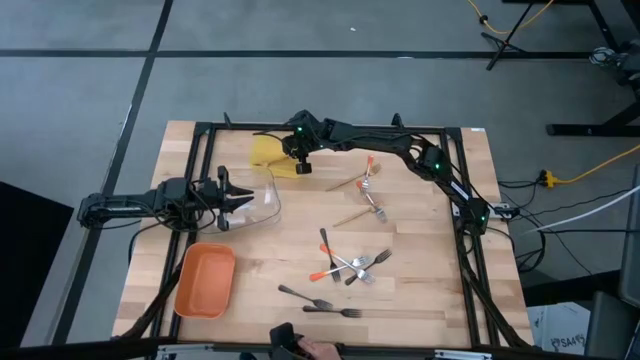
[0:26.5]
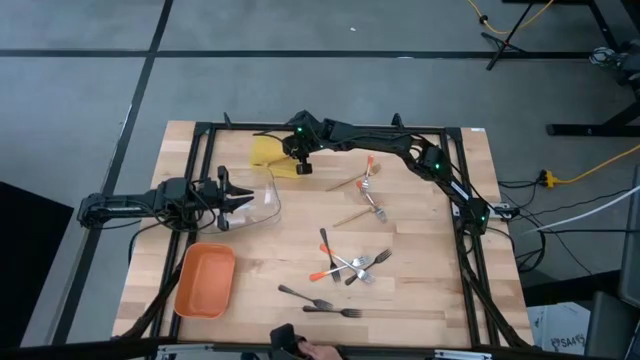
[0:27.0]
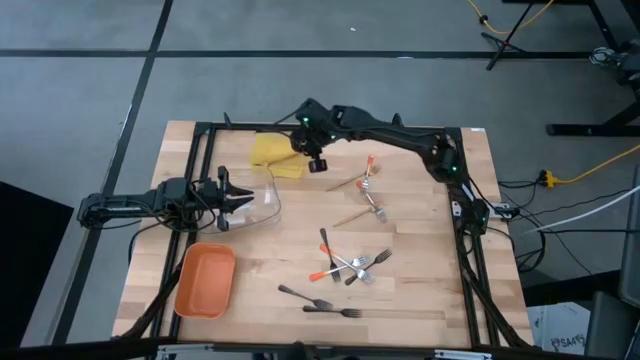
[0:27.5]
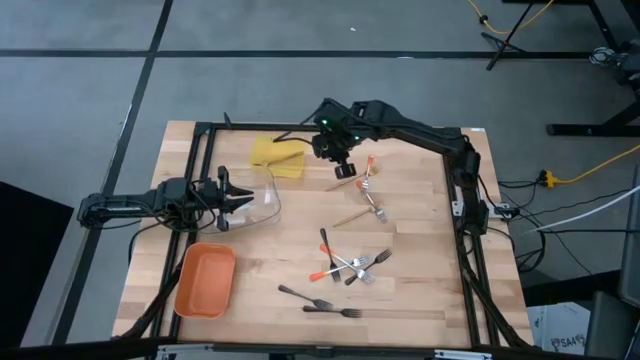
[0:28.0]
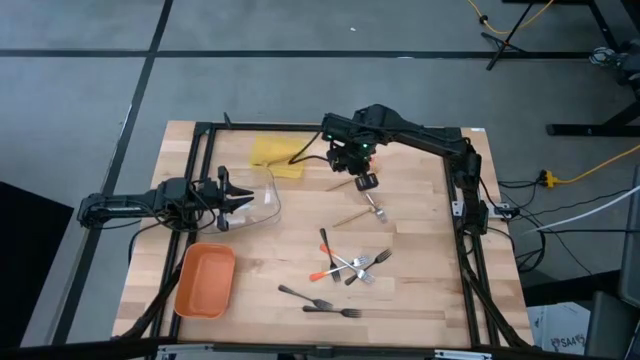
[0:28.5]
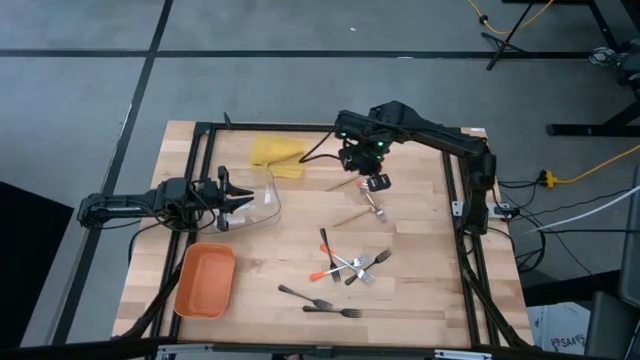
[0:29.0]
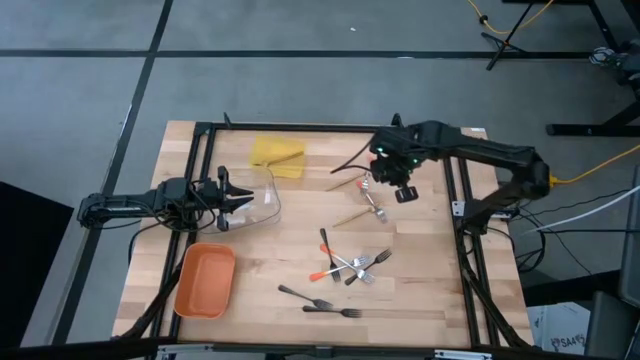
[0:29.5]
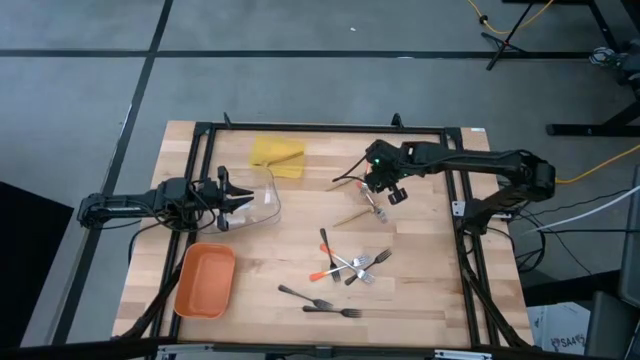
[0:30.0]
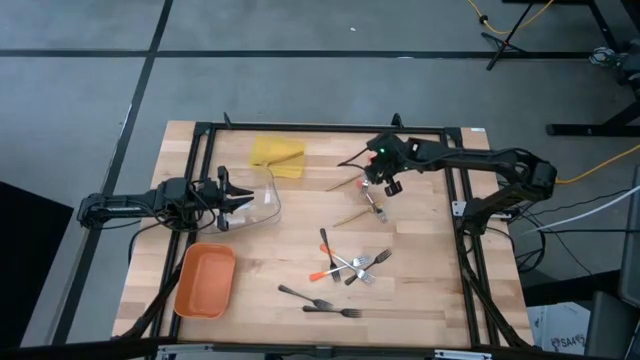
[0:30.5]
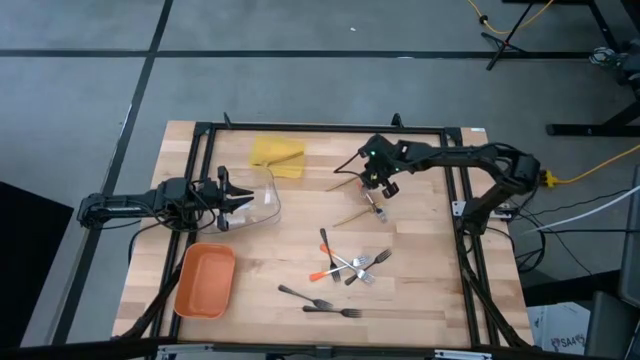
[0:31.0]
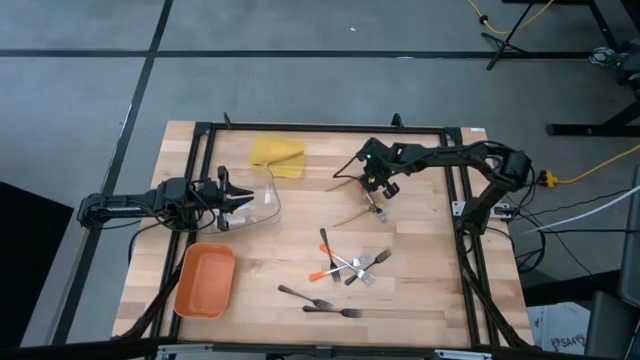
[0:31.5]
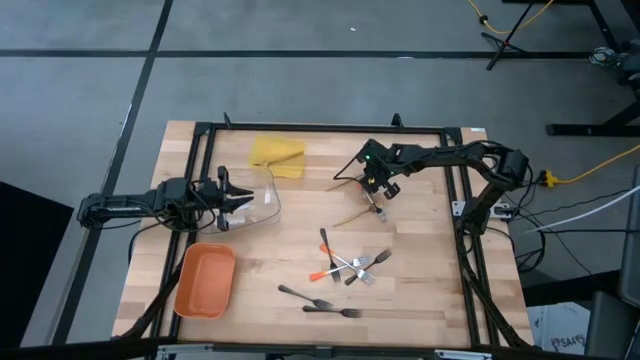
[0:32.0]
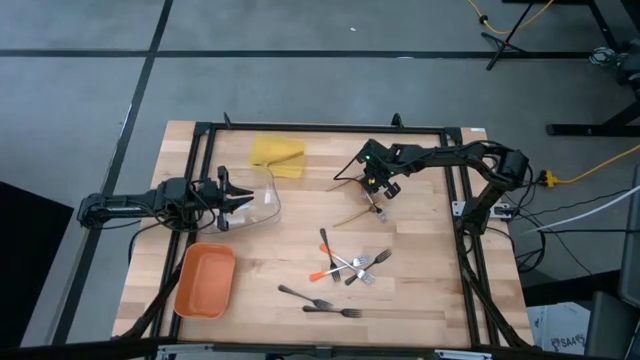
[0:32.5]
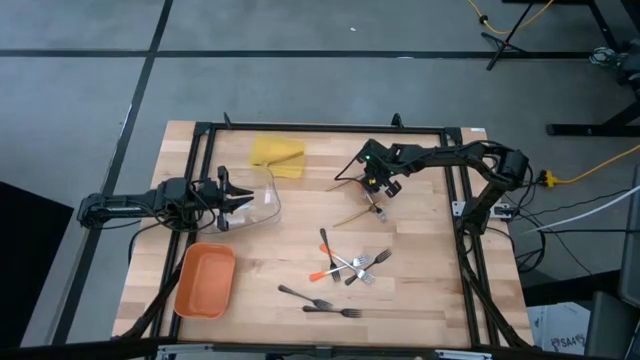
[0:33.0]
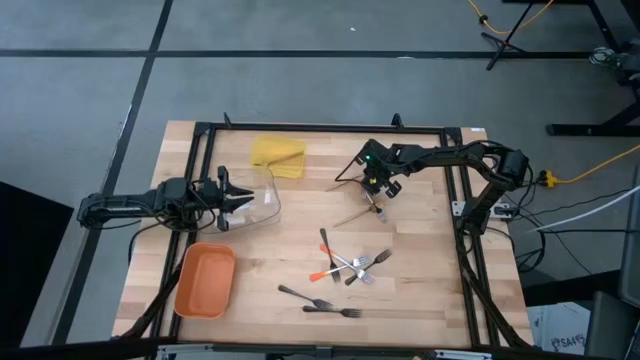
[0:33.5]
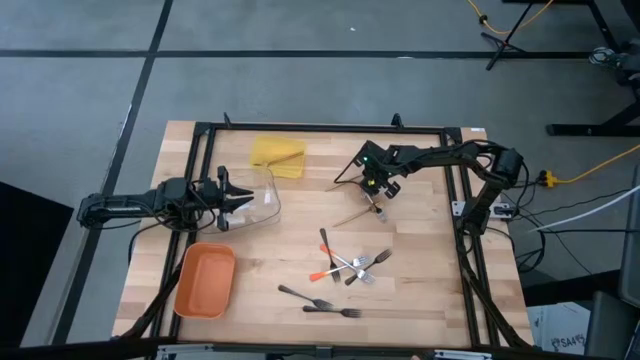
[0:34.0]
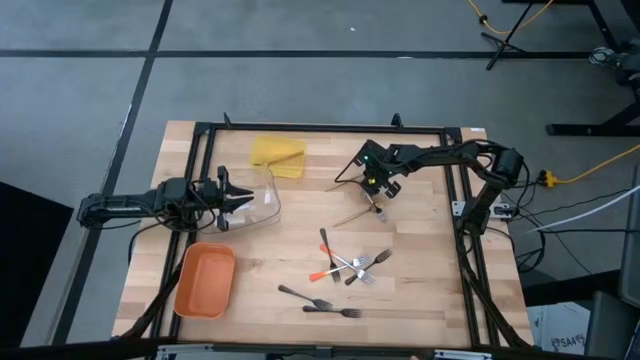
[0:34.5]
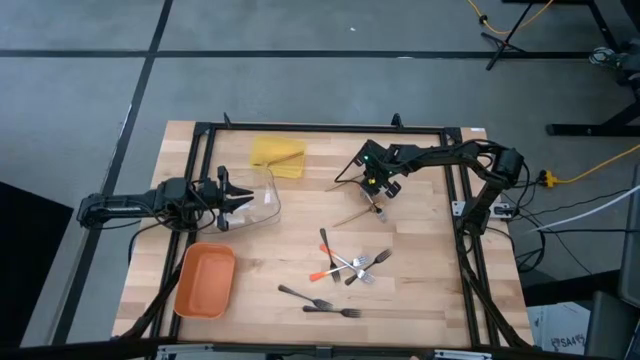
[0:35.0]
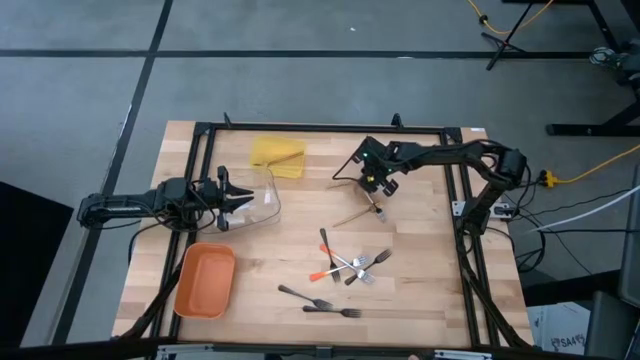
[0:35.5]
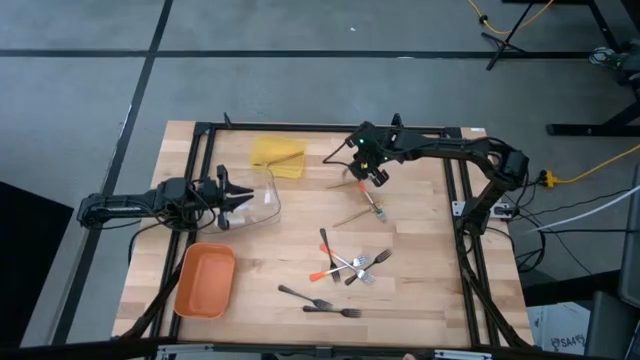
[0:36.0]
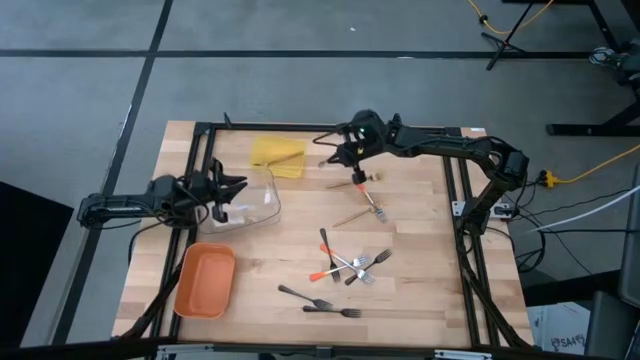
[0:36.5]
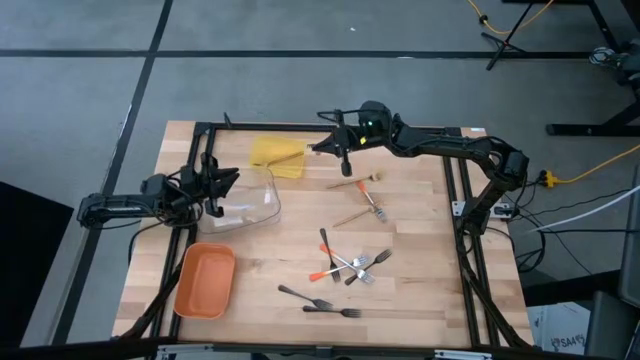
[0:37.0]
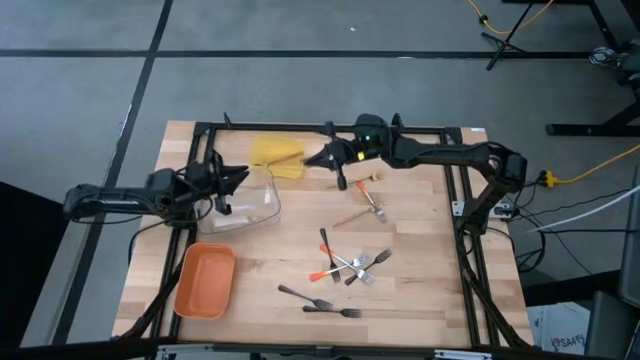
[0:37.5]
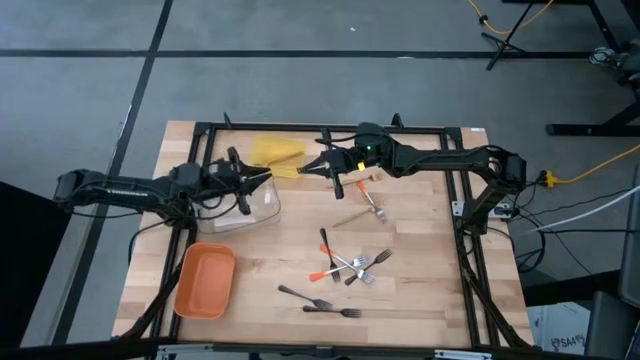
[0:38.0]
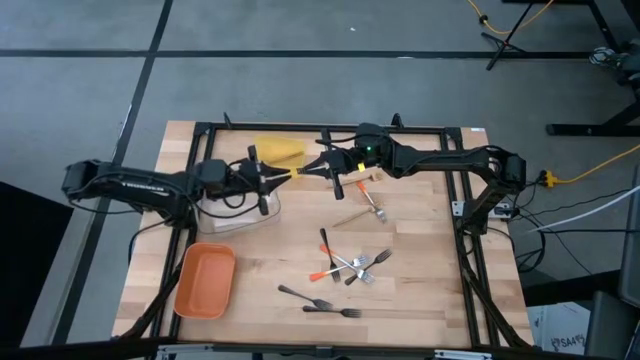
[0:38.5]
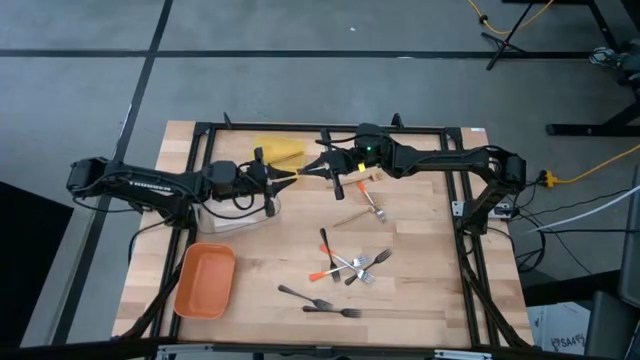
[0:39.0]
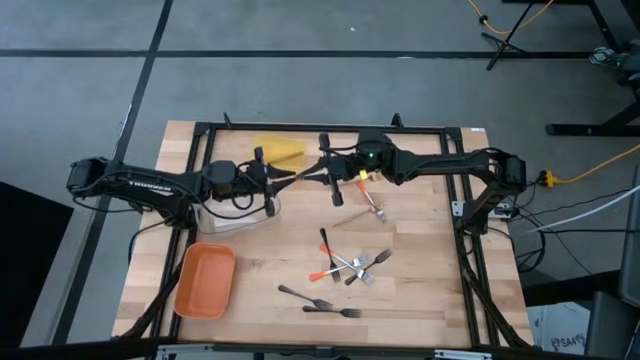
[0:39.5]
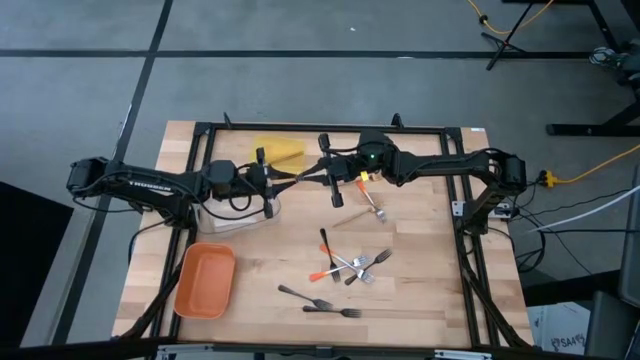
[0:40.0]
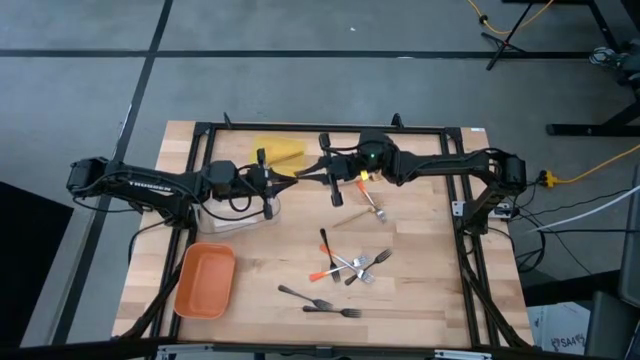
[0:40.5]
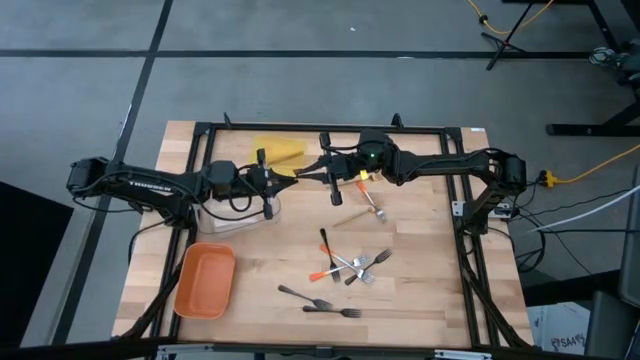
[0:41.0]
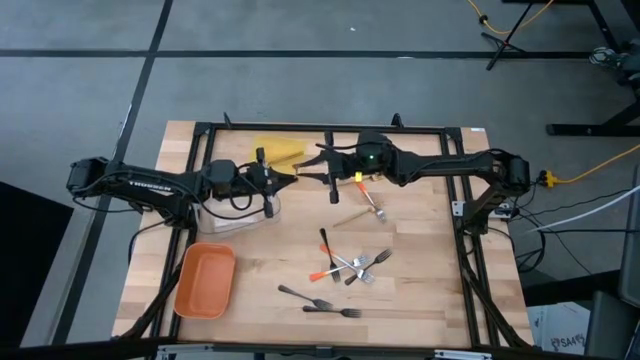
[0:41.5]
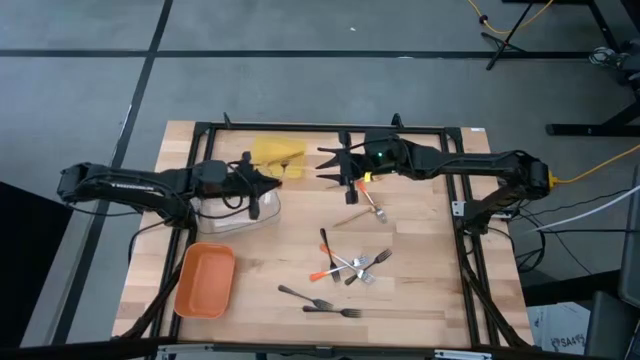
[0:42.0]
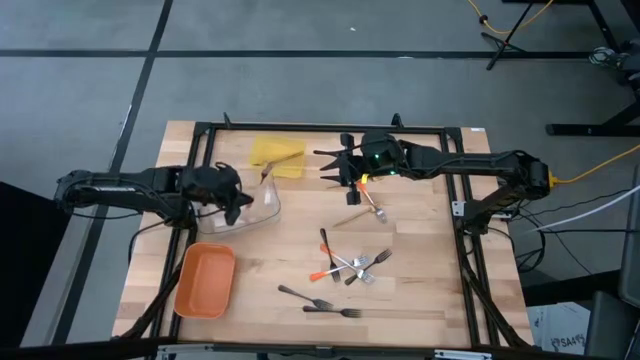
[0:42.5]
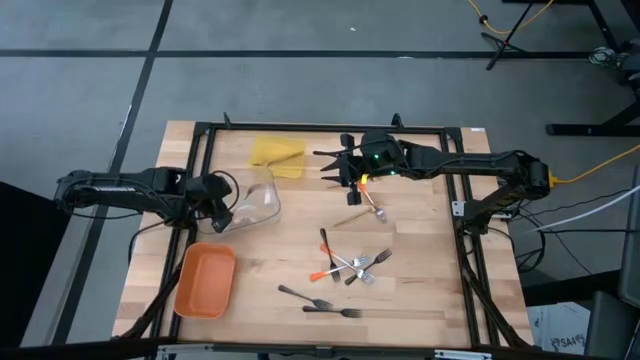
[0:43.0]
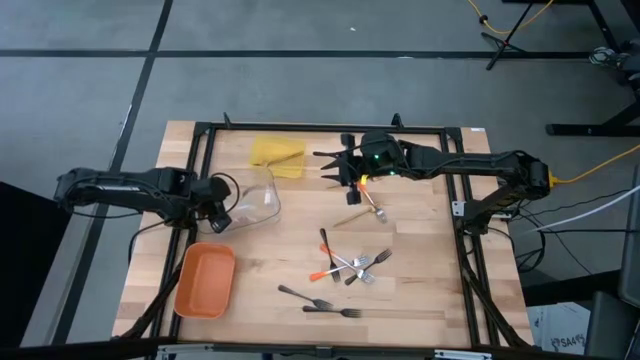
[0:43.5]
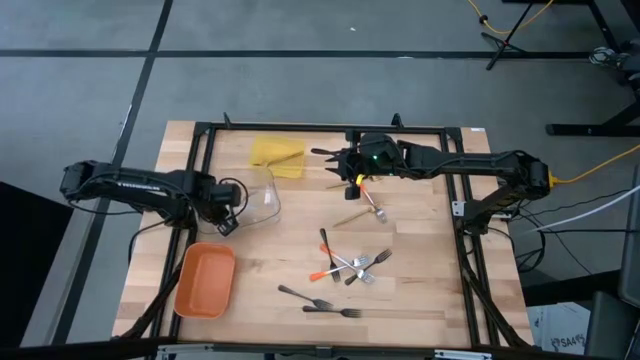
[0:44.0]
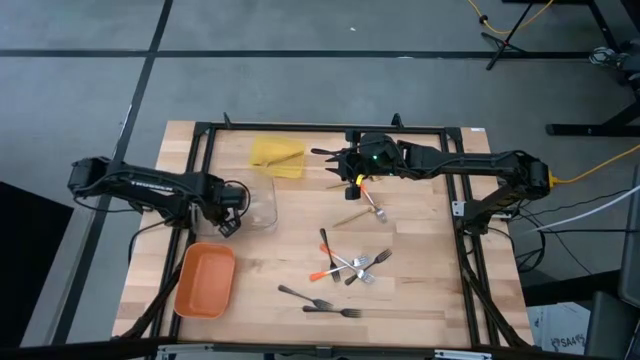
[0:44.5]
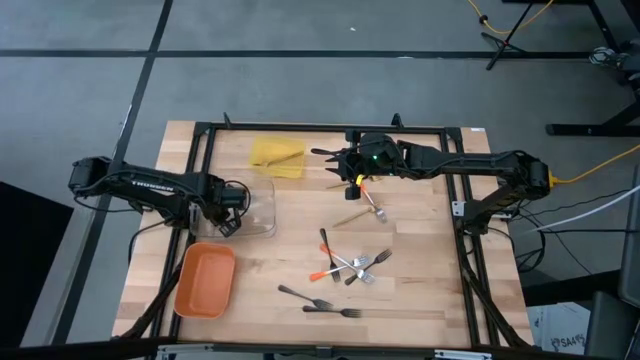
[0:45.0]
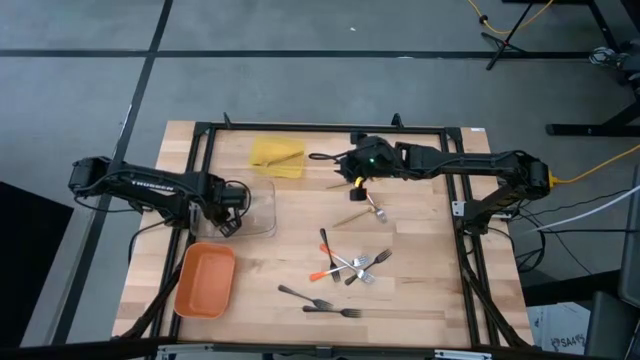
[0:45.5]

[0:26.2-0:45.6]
Task: Sort silverware by color (type)
Put the orange fork into the transparent bin
